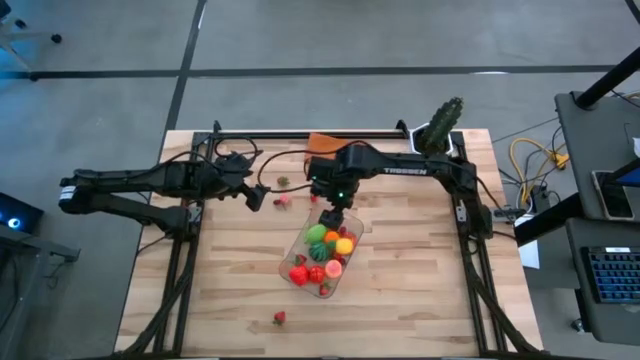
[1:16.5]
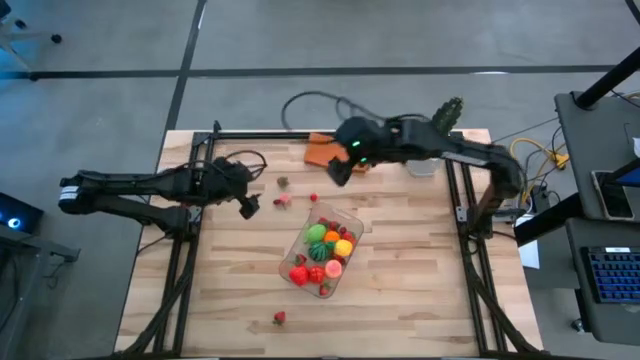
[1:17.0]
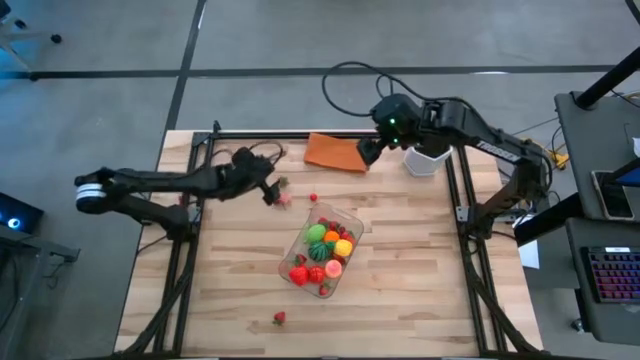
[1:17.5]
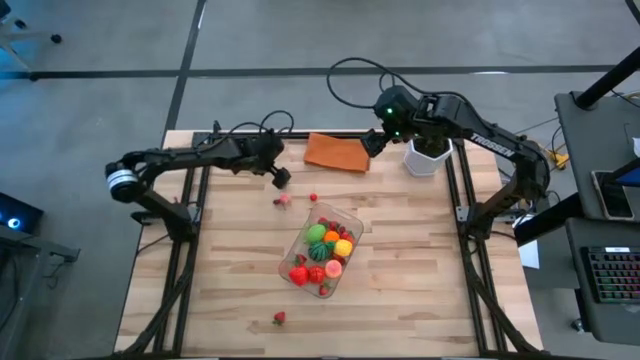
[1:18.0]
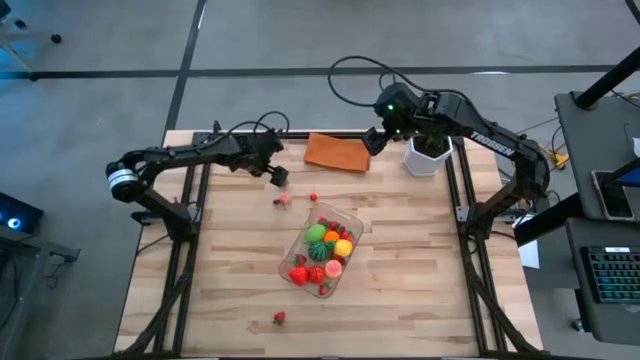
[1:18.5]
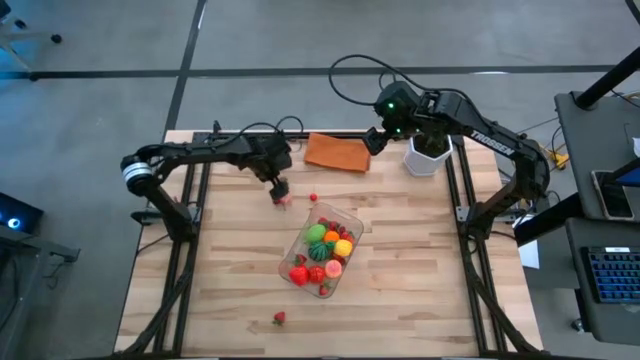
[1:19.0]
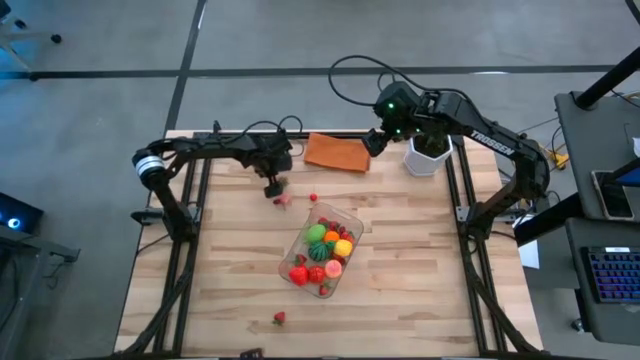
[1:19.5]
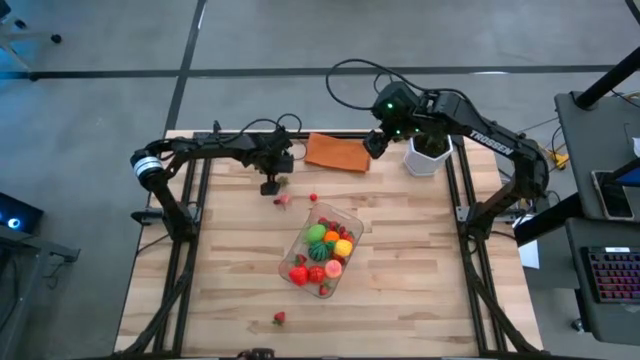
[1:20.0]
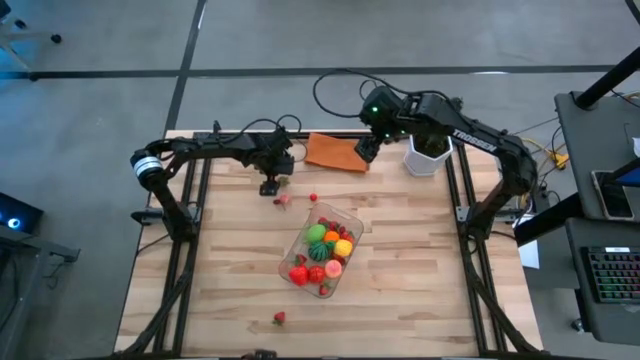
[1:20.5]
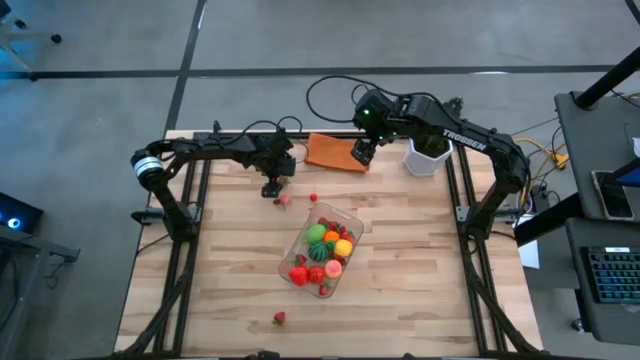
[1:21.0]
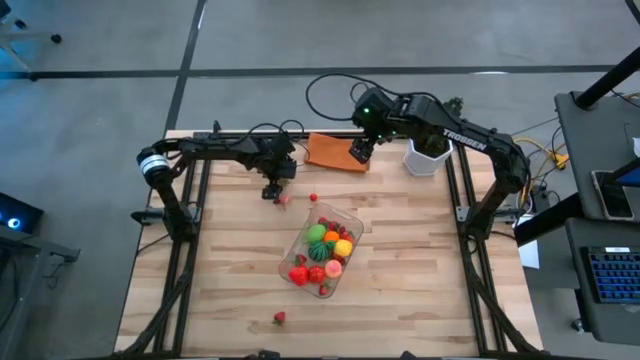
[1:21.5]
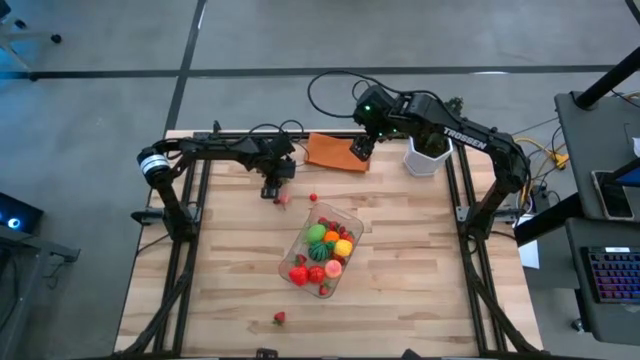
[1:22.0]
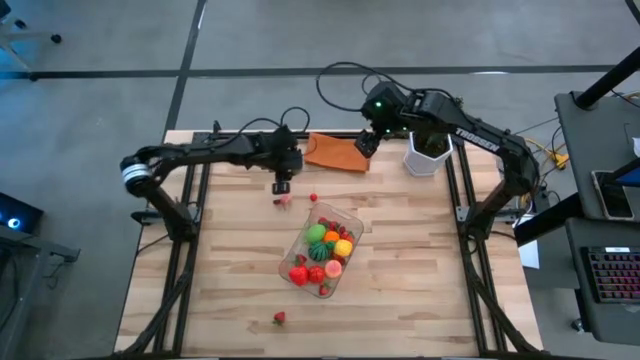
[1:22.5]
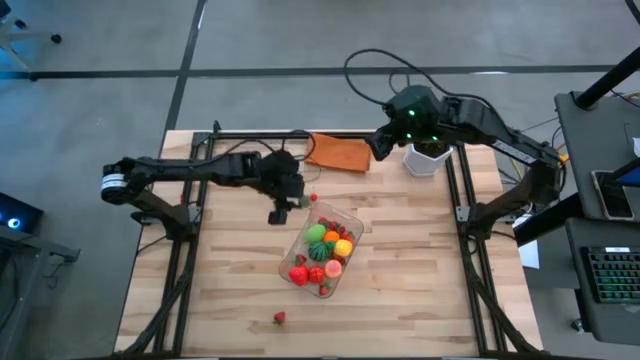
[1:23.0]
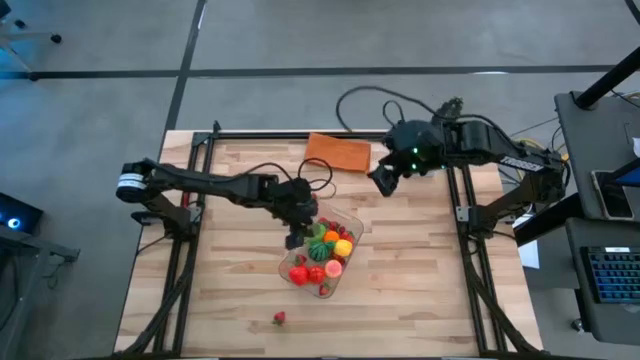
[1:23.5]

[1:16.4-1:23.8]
Task: Pick and placing Produce into tupperware
Put the top strawberry into the transparent bin

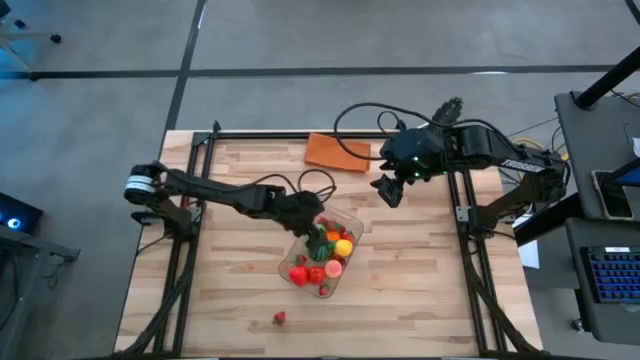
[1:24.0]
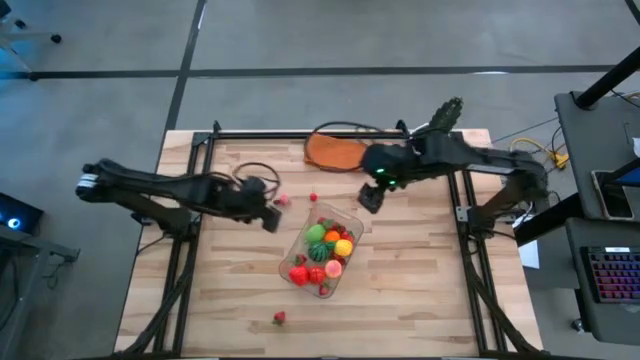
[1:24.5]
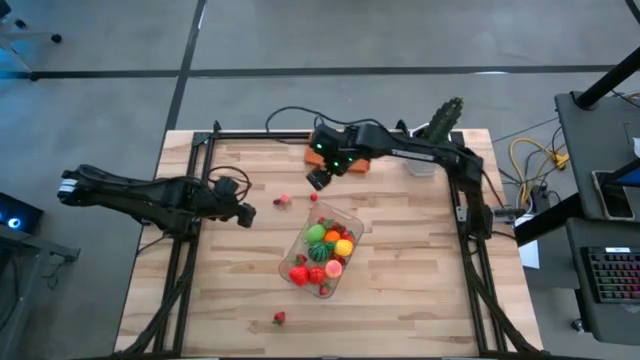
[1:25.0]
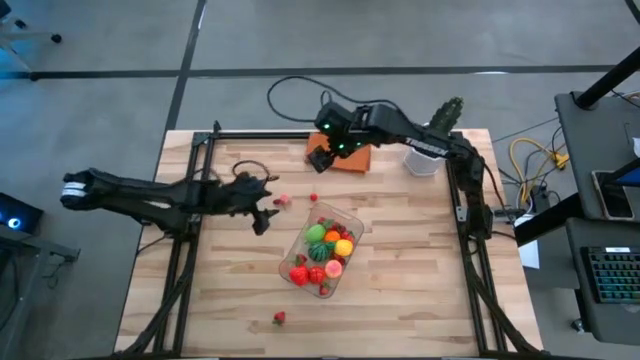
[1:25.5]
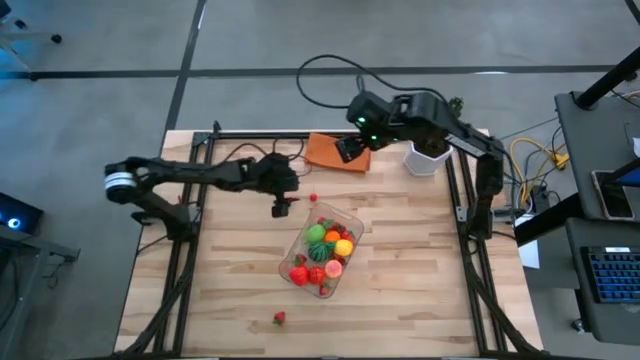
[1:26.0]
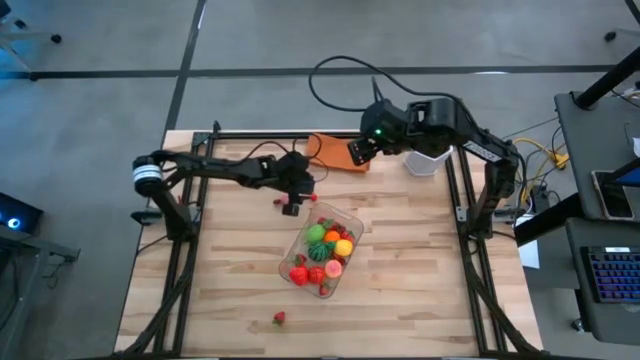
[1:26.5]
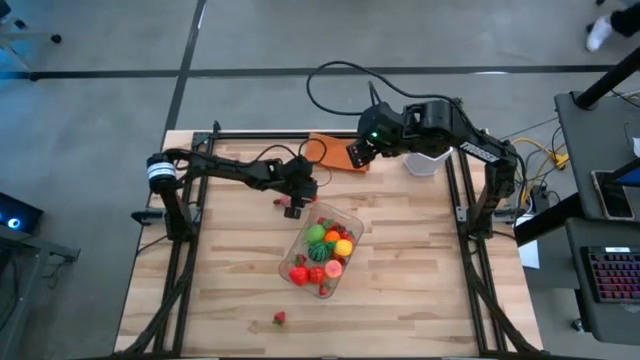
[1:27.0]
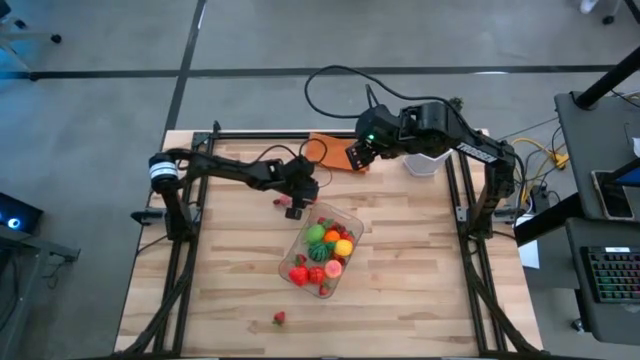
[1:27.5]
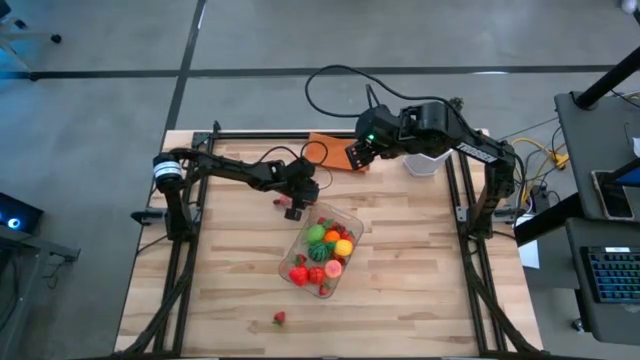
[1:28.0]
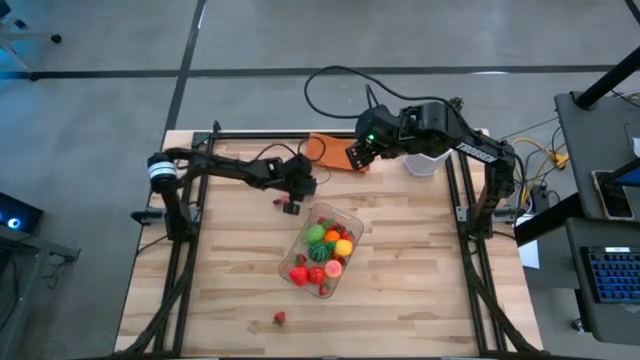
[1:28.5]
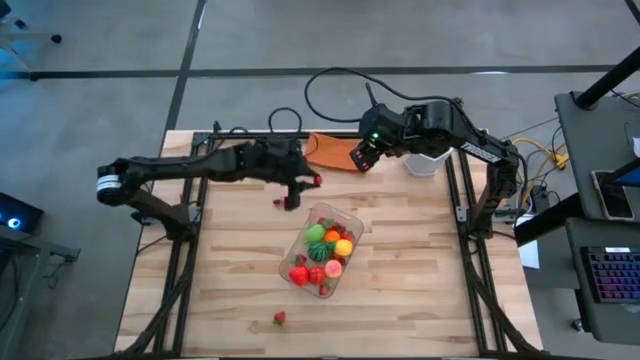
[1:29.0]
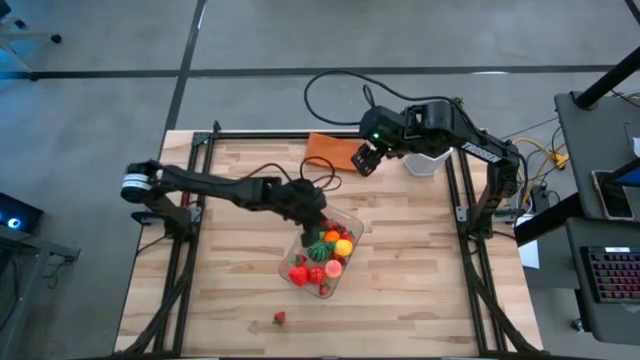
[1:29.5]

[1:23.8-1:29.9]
Put the top right cherry into the transparent bin

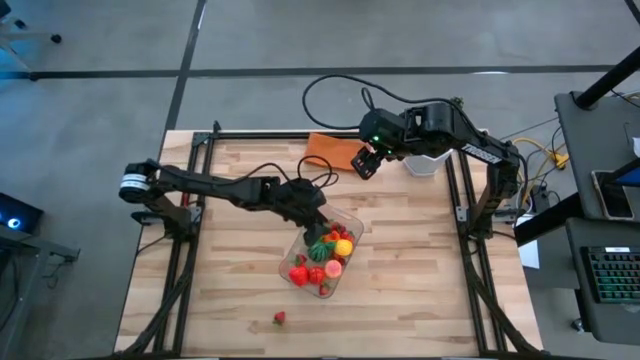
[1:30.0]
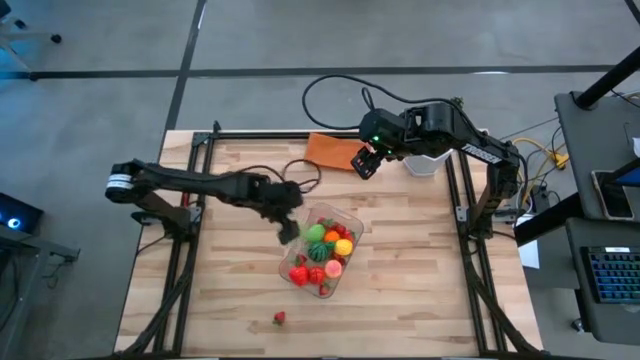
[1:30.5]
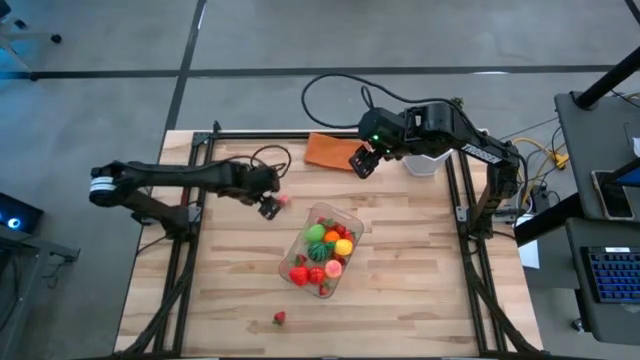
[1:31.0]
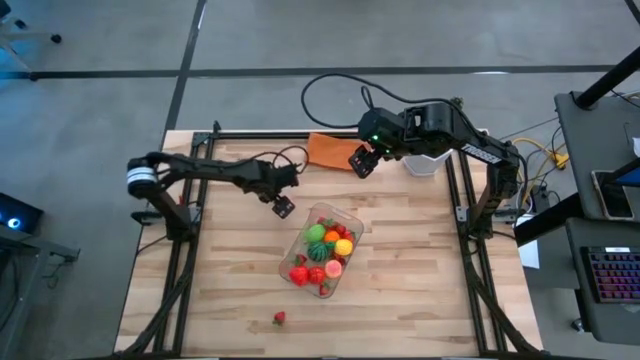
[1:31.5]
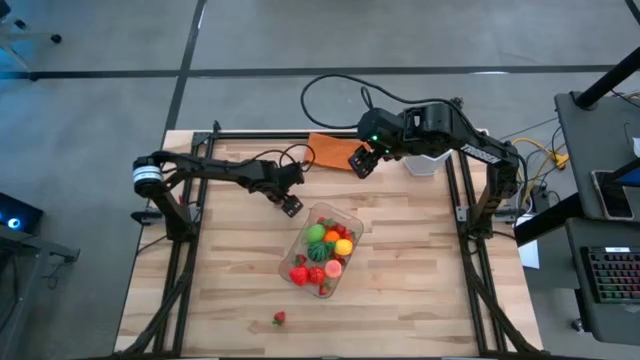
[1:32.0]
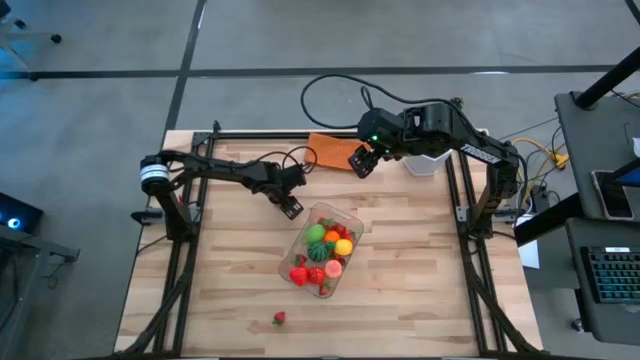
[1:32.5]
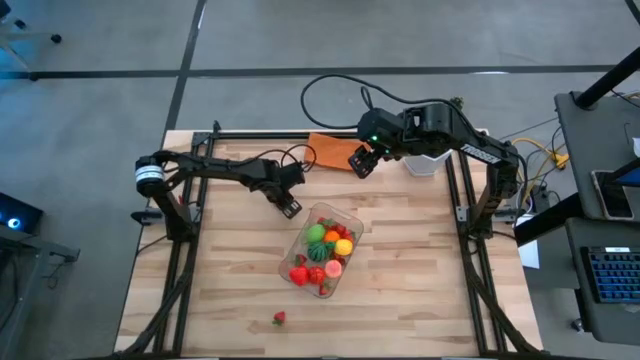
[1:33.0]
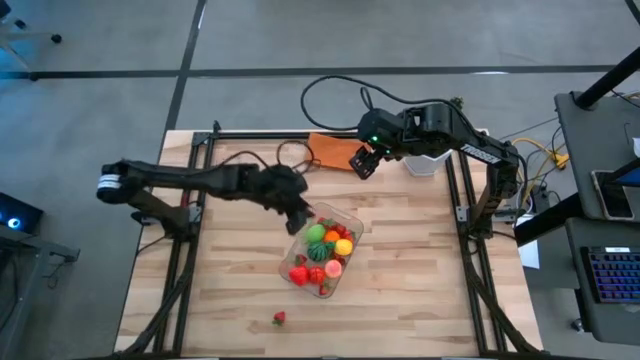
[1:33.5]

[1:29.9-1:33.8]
Put the apricot into the transparent bin

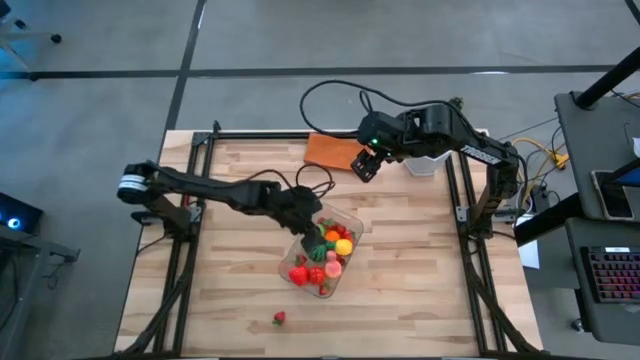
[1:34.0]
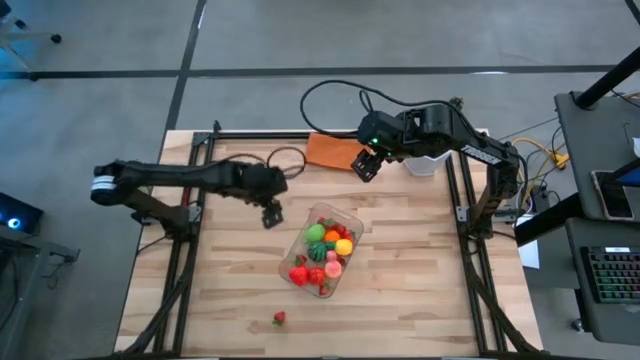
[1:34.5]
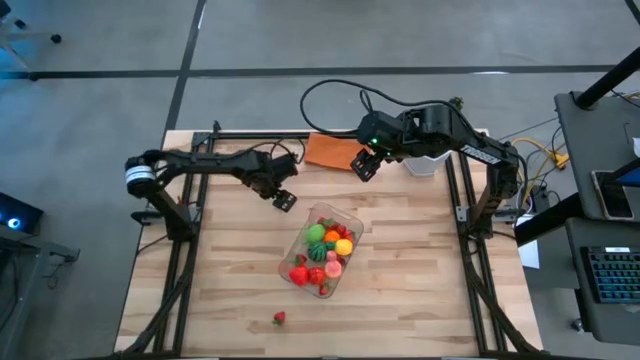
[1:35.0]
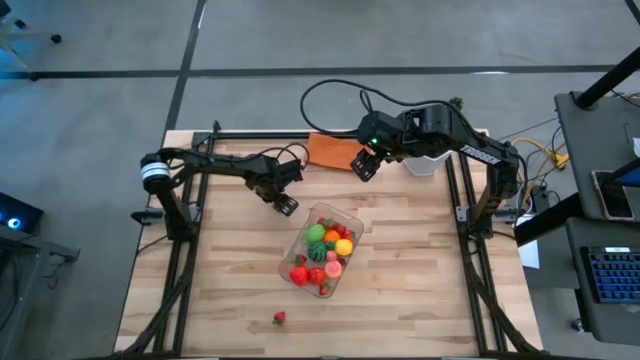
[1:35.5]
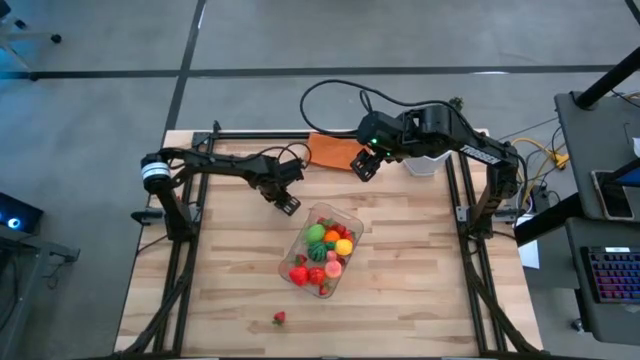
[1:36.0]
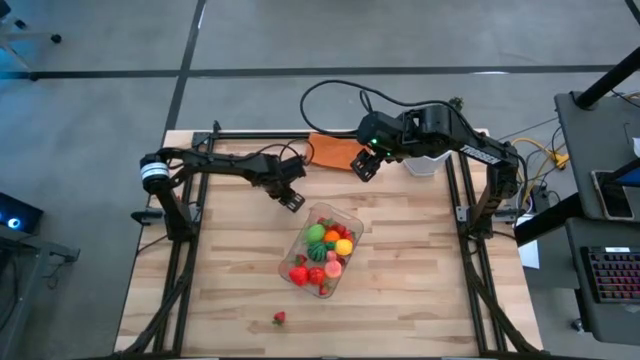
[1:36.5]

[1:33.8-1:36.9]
Put the cherry into the transparent bin
